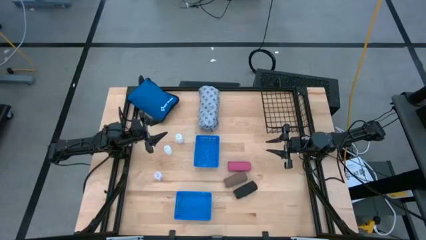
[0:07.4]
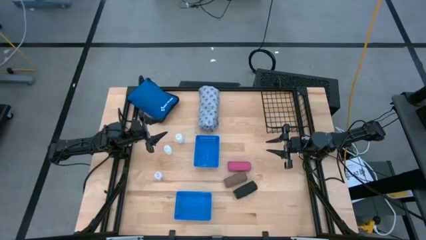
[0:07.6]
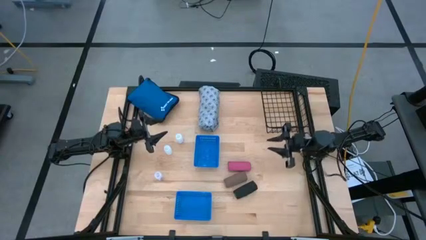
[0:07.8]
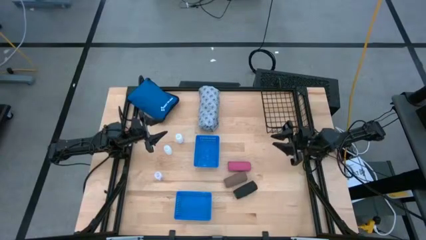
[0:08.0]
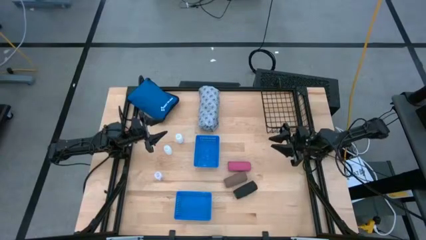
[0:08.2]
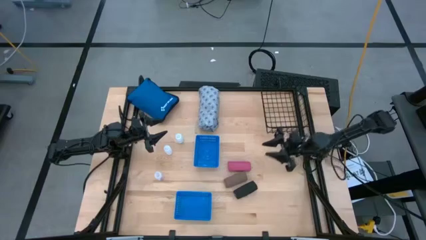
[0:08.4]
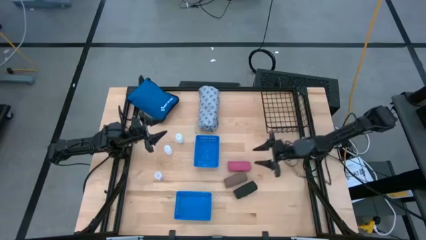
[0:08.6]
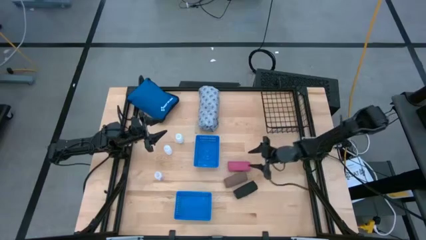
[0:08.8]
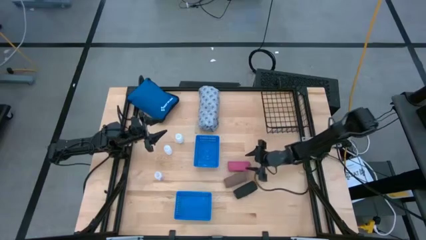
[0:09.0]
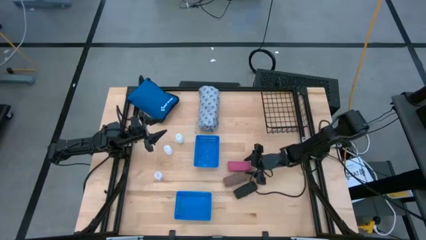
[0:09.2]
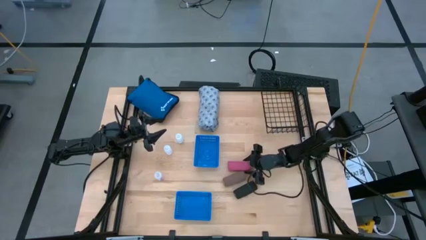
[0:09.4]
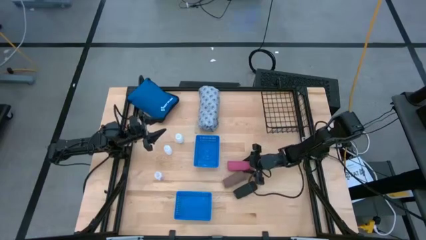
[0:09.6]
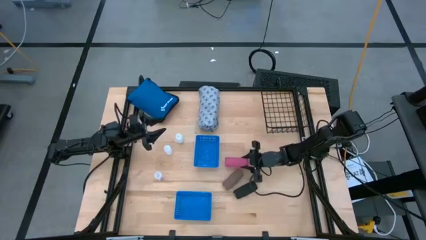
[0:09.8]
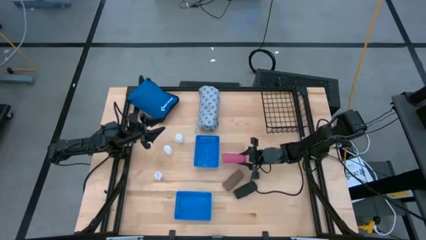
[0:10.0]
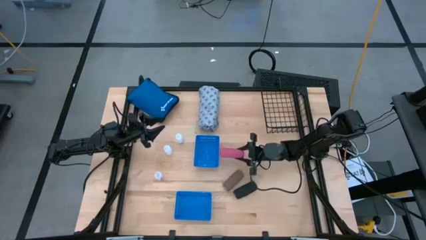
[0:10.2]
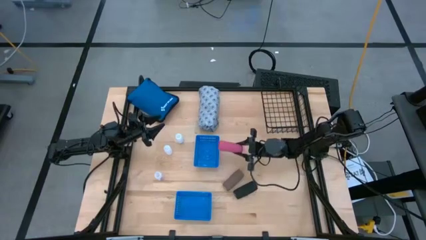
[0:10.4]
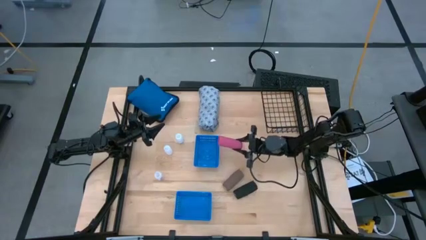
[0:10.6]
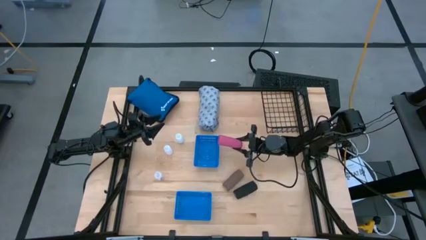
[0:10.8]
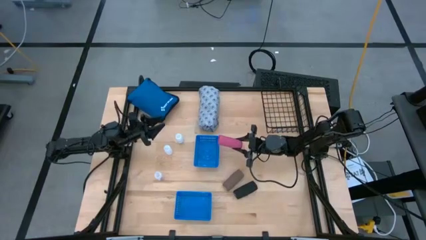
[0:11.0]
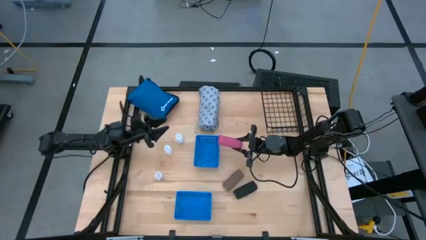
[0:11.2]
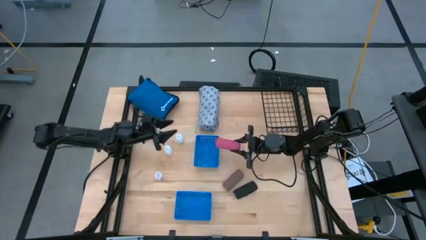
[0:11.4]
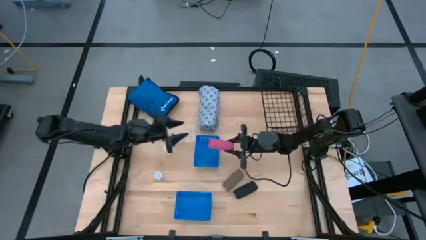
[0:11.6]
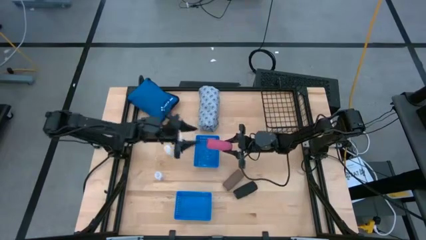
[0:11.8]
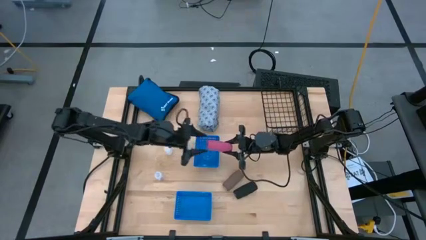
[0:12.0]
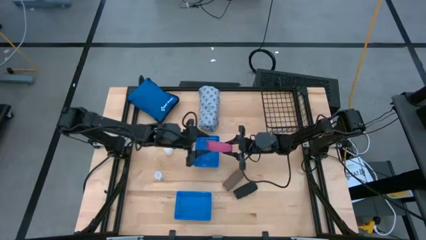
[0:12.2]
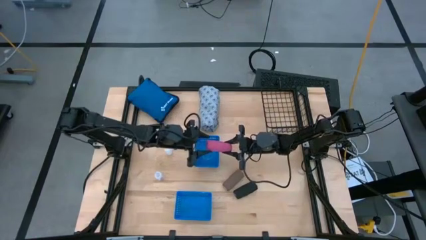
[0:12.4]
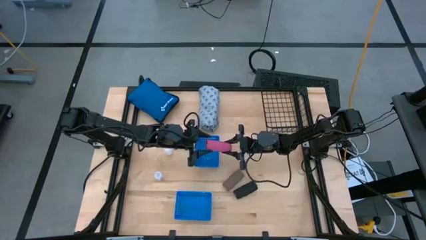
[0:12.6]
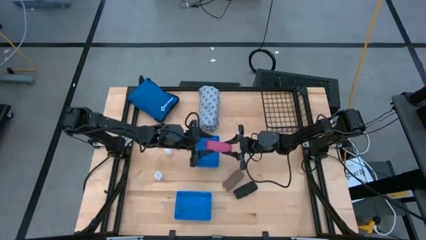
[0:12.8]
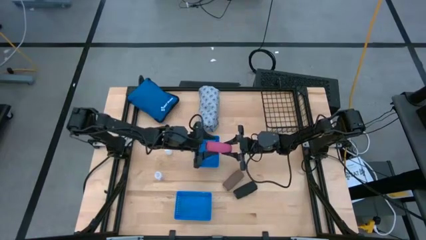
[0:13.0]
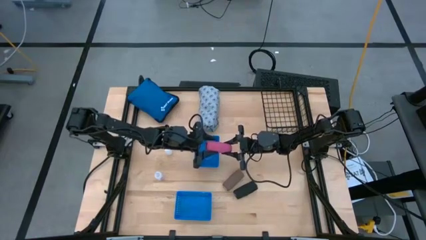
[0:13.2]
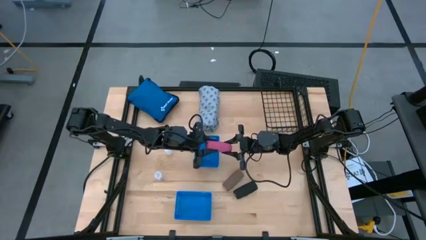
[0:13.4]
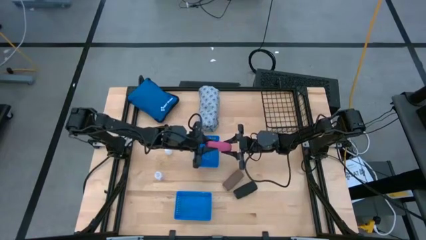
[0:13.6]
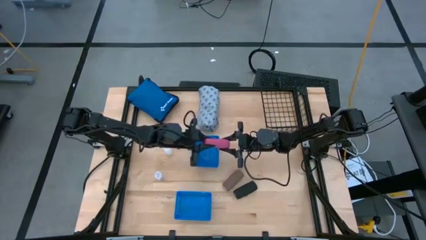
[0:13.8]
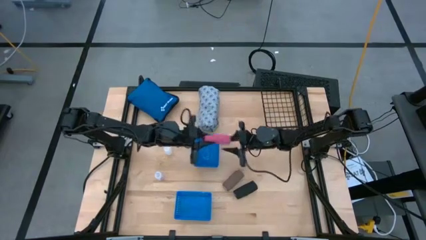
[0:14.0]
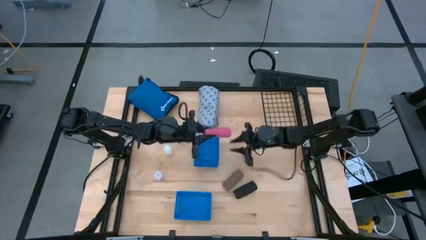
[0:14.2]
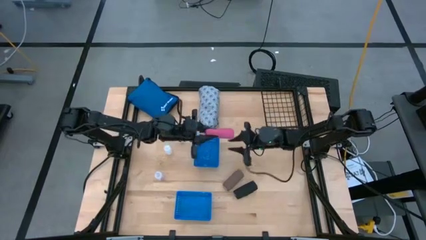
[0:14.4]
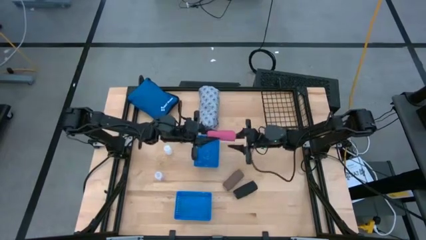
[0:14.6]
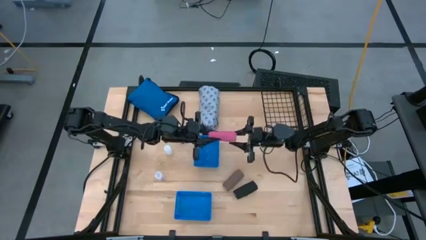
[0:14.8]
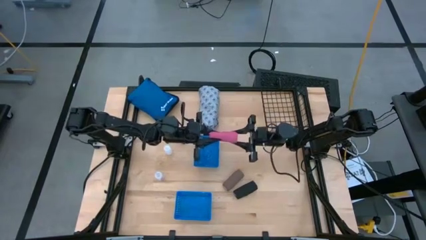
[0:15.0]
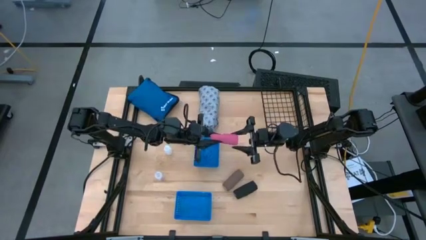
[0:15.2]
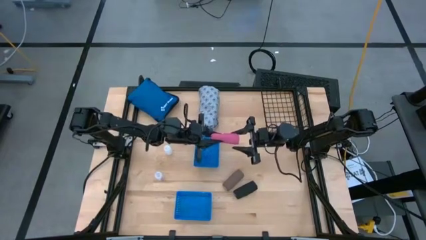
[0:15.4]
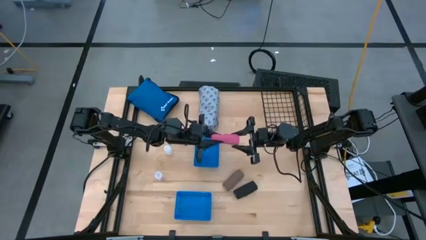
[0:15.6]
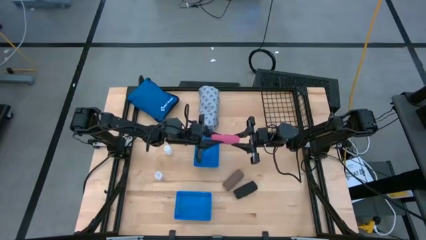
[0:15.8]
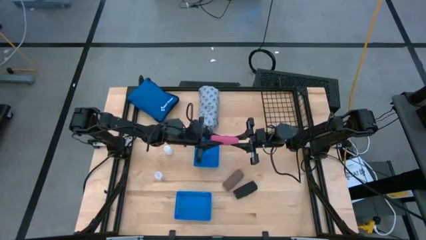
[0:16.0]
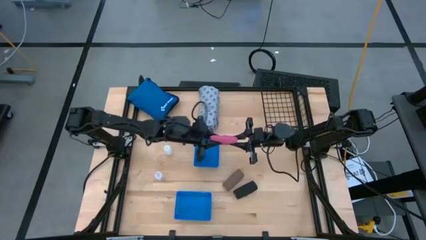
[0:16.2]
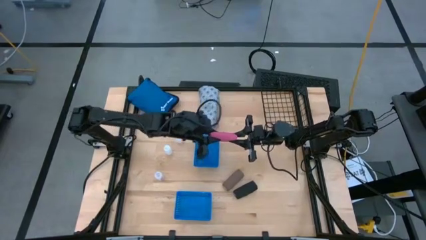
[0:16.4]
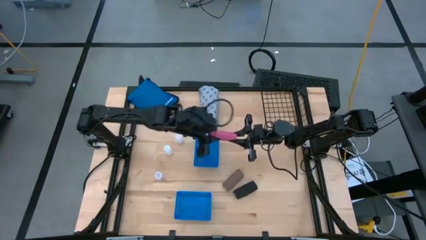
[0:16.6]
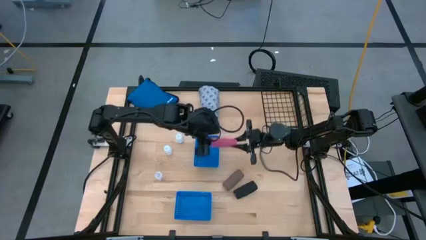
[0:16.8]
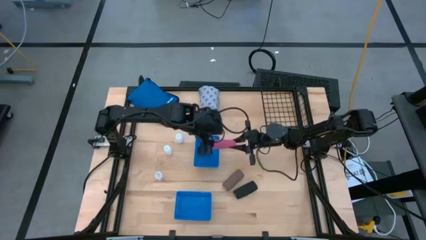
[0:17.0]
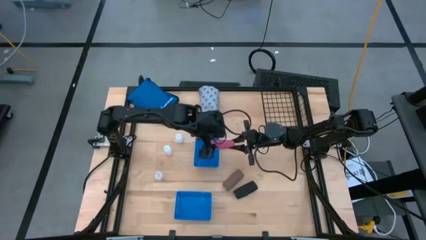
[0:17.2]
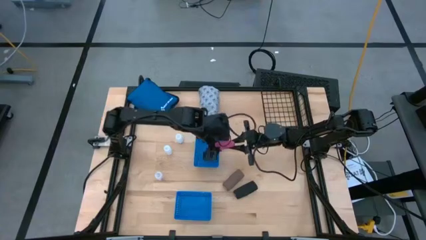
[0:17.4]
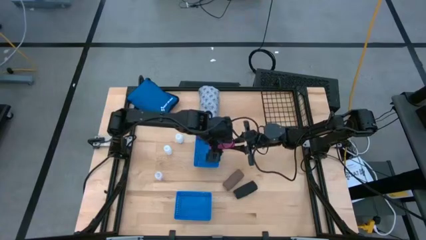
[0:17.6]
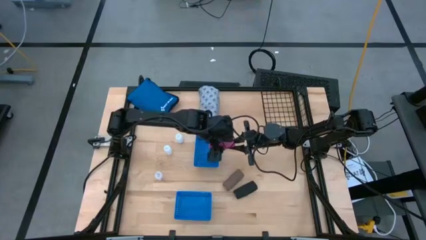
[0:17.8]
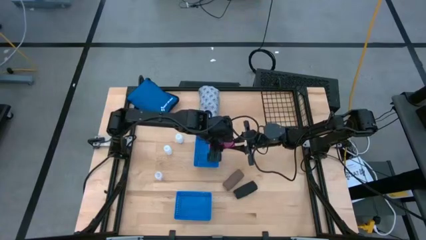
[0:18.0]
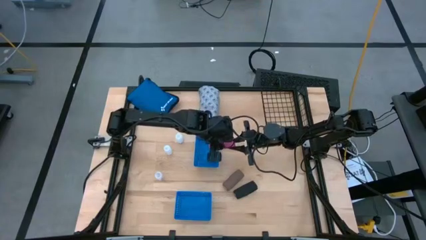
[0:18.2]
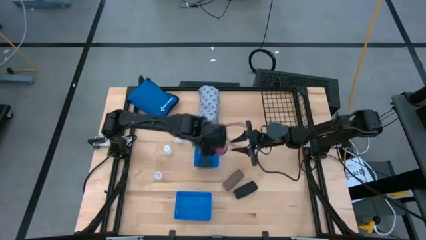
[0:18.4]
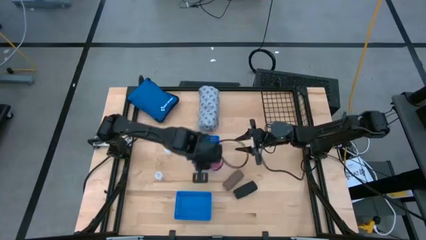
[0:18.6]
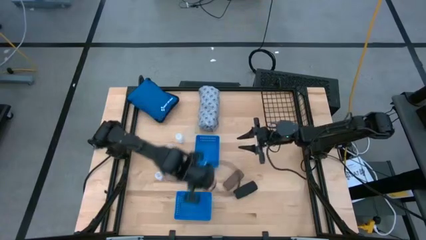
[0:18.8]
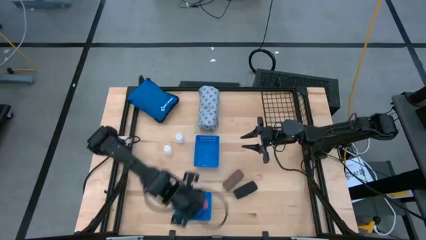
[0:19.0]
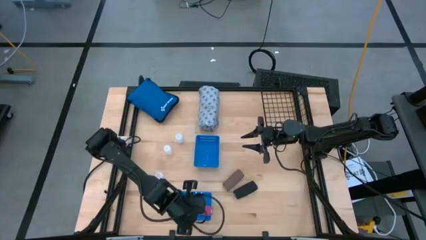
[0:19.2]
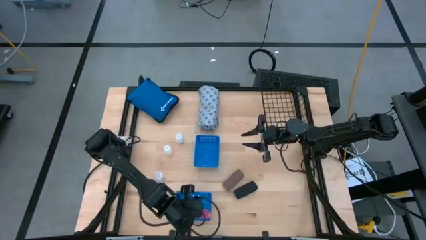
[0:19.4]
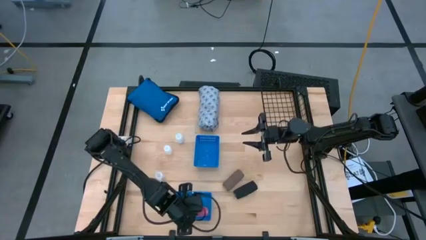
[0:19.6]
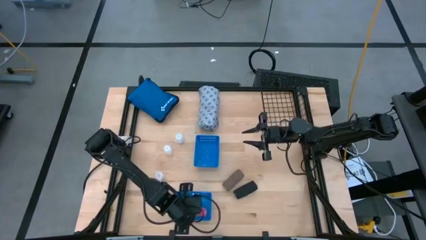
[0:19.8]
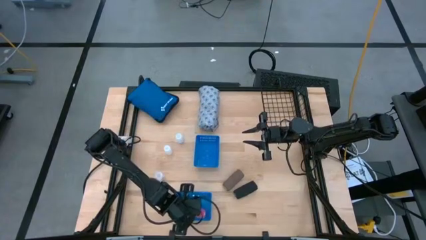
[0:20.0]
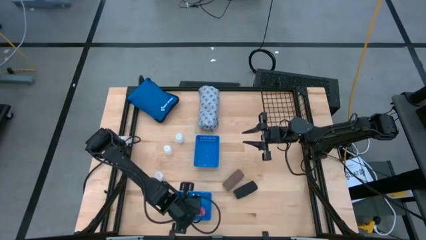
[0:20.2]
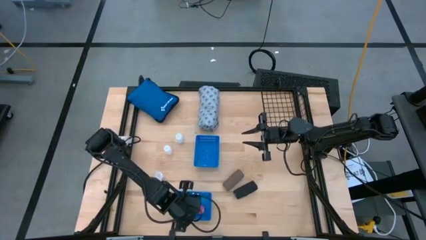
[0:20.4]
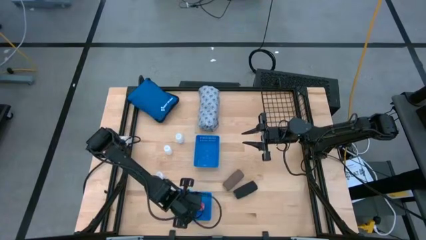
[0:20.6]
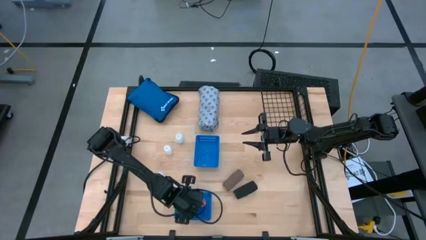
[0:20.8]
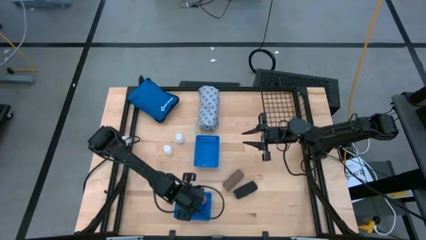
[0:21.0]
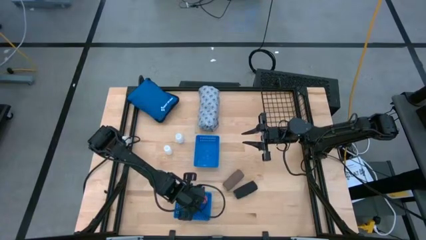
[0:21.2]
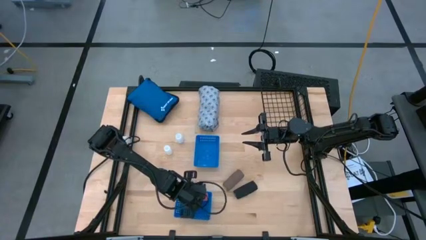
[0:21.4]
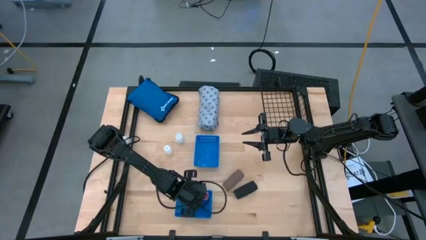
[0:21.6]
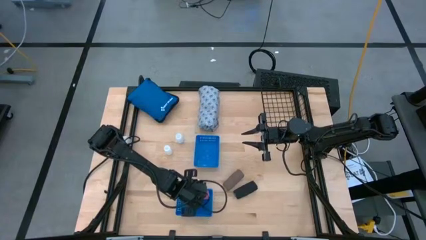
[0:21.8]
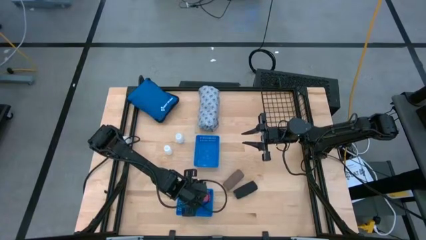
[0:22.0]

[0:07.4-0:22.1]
Task: Pick & place medical supplies in basket/bin
Put the pink bandage into the bottom blue basket

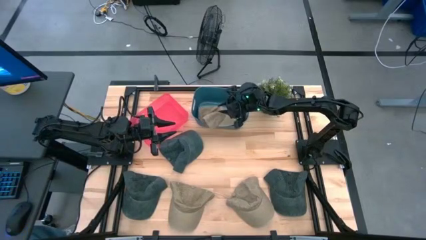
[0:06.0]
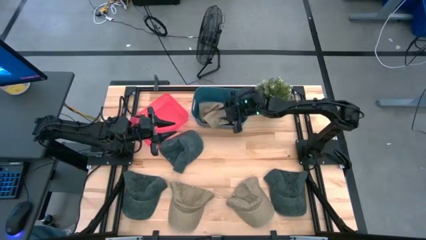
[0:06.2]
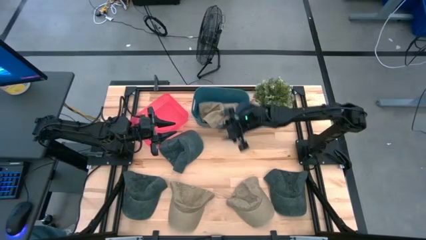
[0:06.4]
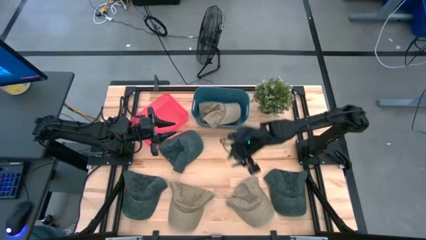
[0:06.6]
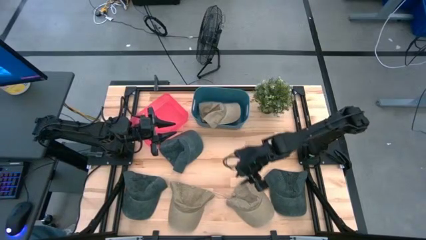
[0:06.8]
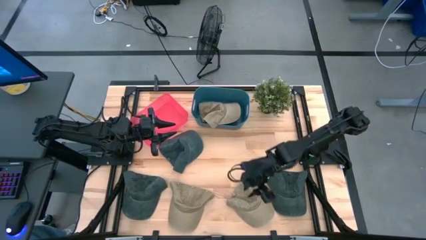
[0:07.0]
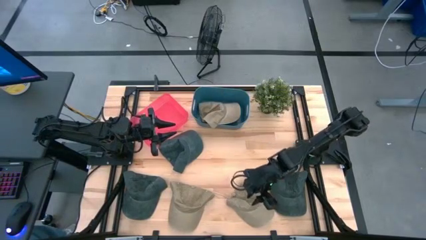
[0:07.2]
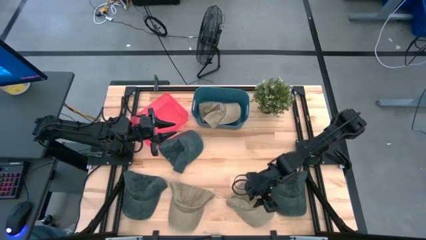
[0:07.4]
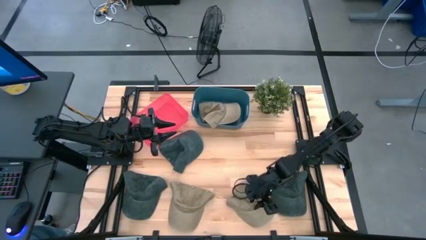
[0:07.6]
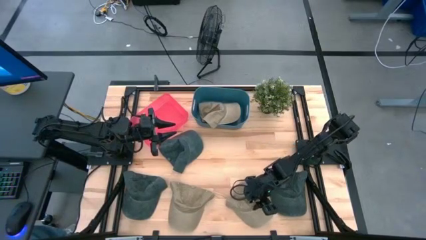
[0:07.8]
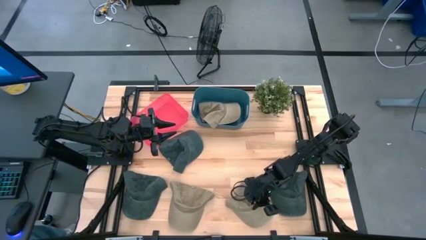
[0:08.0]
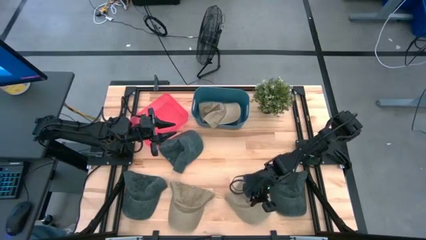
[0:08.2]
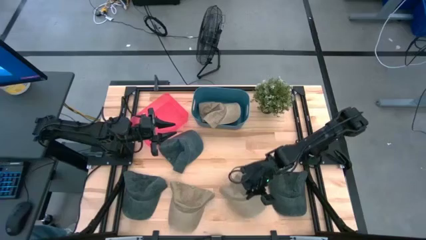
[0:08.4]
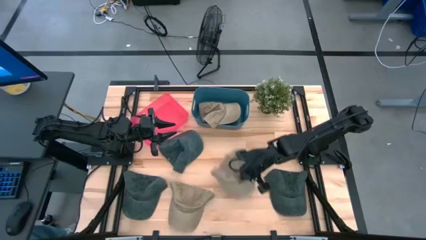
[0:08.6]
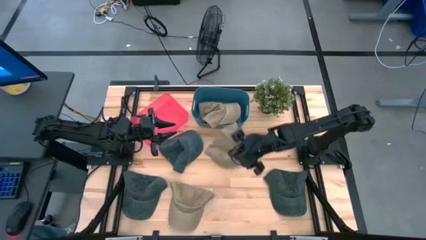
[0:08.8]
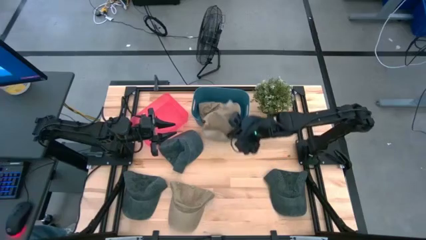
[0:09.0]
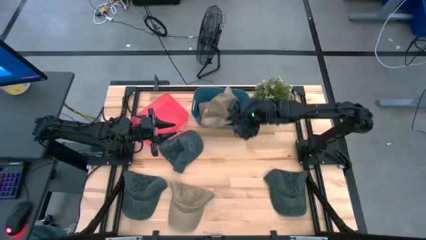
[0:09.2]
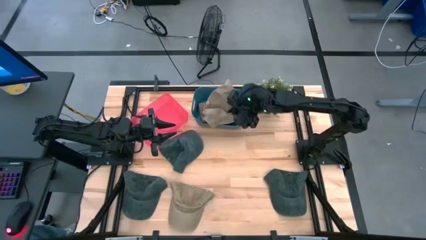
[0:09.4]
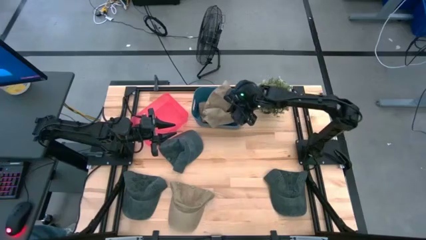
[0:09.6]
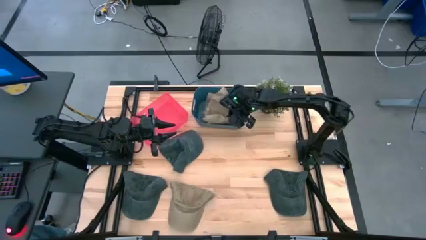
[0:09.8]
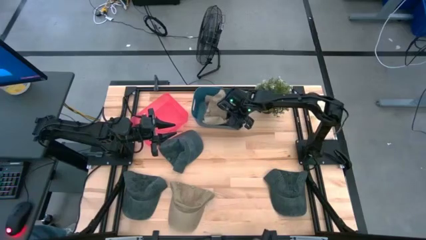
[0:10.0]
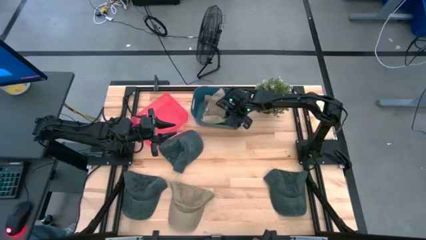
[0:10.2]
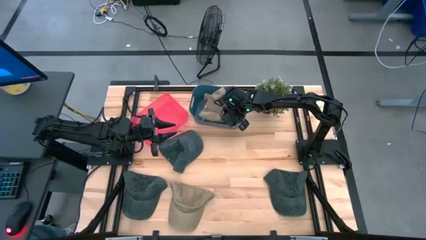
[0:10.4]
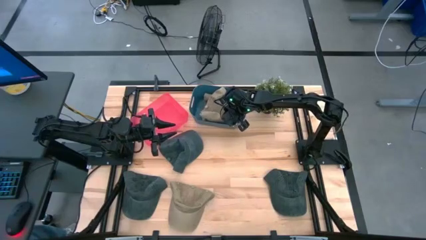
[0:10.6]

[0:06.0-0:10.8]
Task: Pick & Place hat
Put the right brown cap into the blue bin
